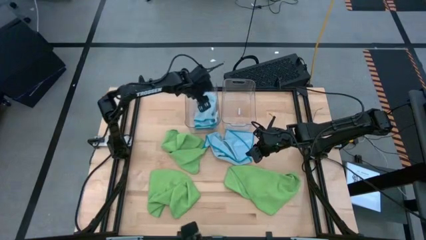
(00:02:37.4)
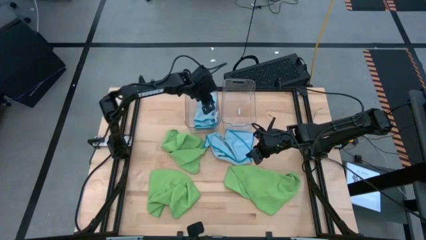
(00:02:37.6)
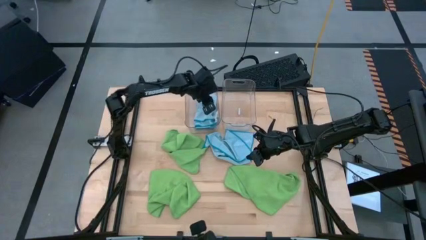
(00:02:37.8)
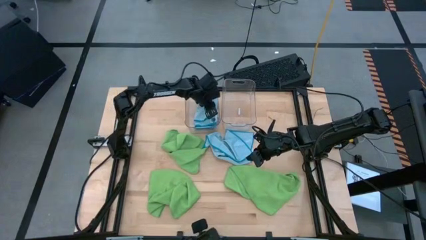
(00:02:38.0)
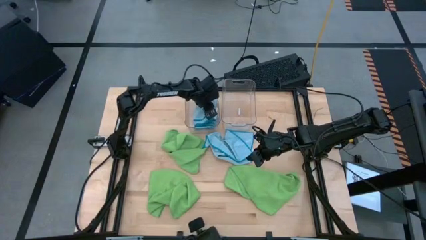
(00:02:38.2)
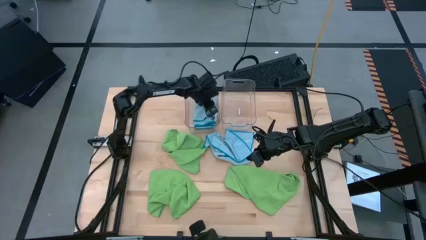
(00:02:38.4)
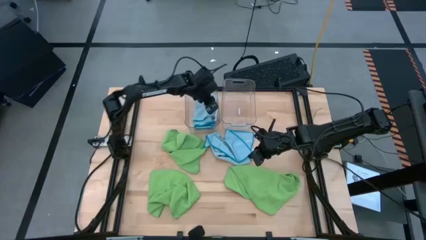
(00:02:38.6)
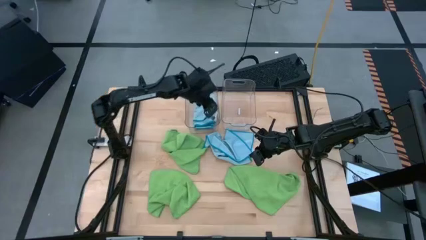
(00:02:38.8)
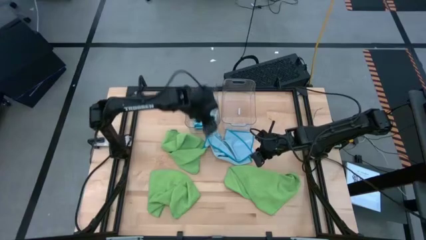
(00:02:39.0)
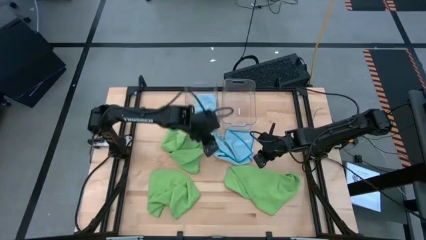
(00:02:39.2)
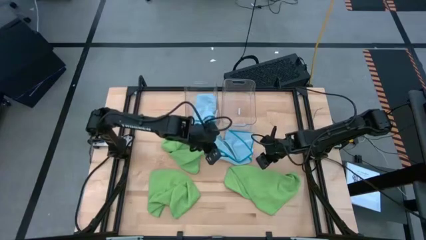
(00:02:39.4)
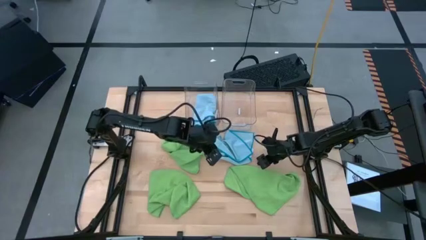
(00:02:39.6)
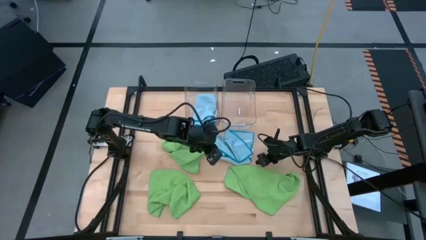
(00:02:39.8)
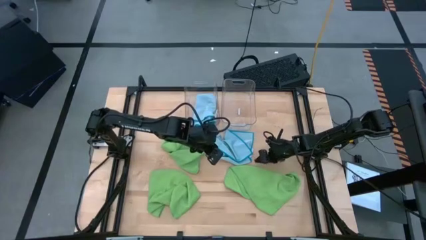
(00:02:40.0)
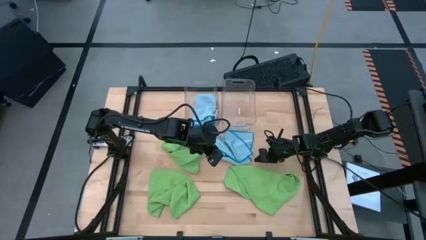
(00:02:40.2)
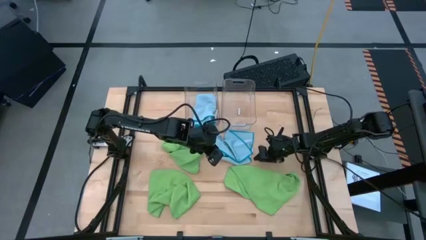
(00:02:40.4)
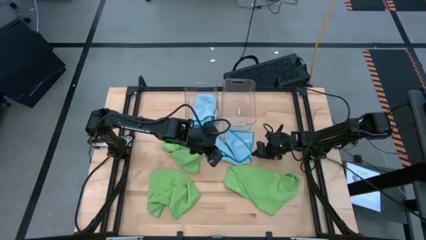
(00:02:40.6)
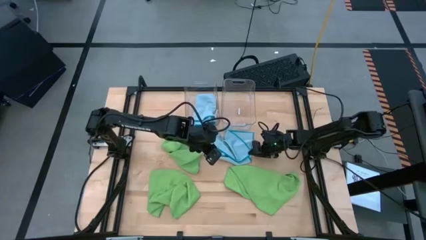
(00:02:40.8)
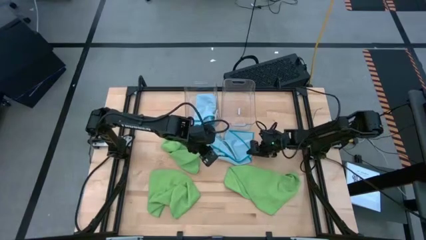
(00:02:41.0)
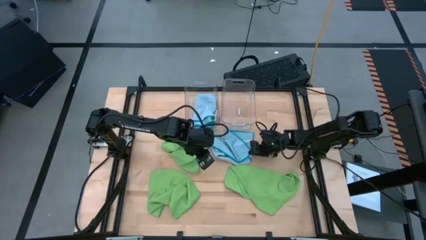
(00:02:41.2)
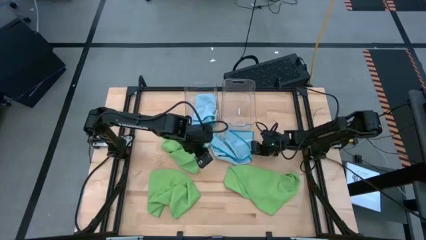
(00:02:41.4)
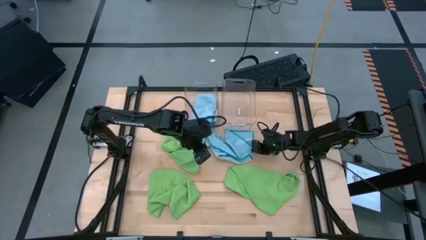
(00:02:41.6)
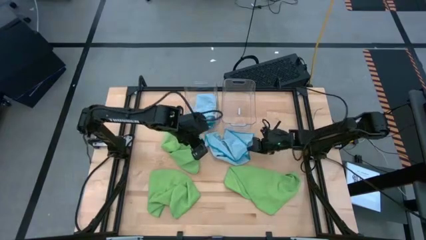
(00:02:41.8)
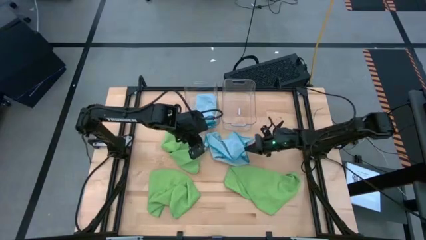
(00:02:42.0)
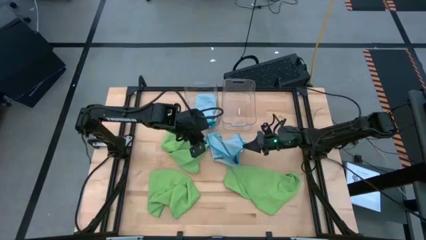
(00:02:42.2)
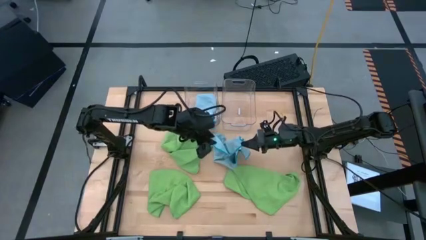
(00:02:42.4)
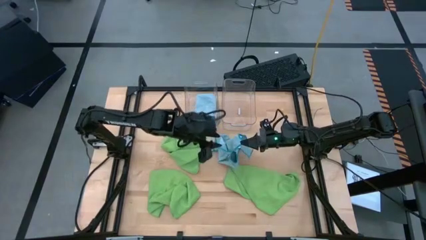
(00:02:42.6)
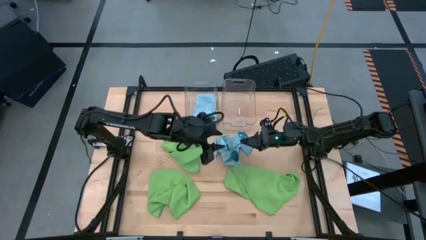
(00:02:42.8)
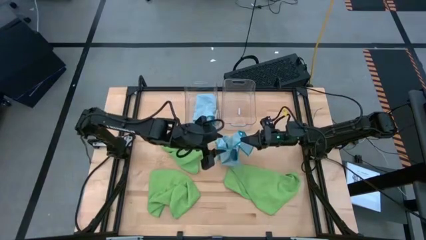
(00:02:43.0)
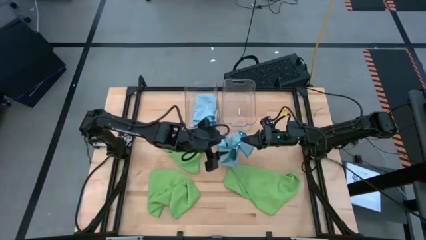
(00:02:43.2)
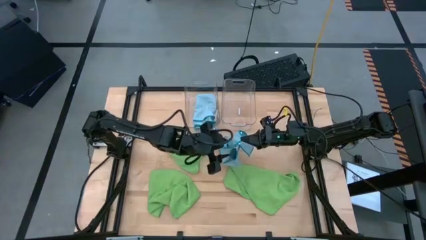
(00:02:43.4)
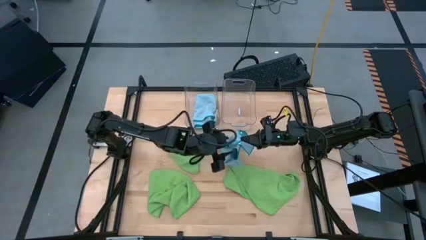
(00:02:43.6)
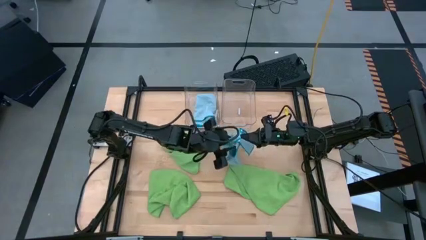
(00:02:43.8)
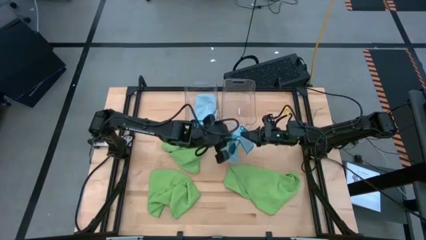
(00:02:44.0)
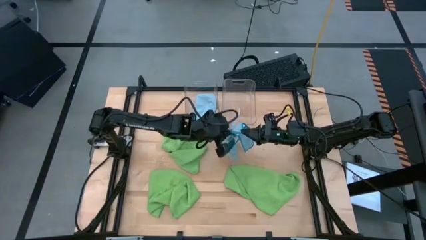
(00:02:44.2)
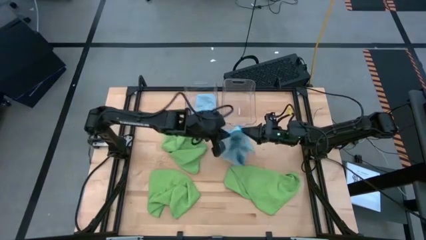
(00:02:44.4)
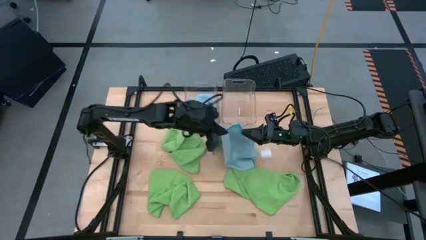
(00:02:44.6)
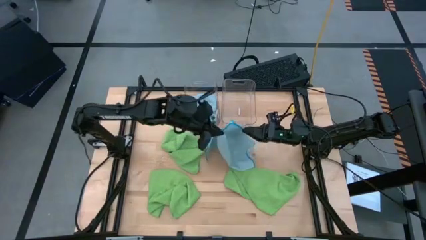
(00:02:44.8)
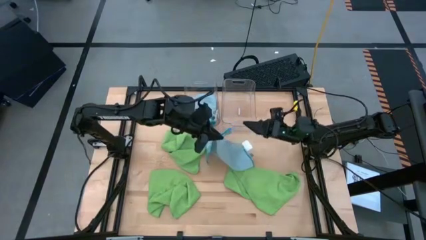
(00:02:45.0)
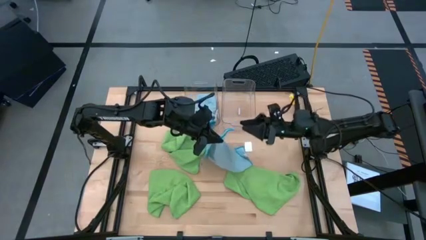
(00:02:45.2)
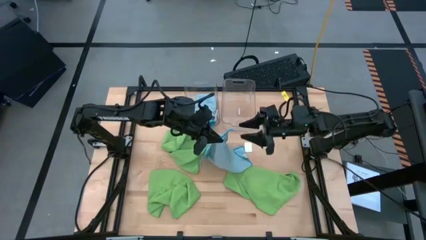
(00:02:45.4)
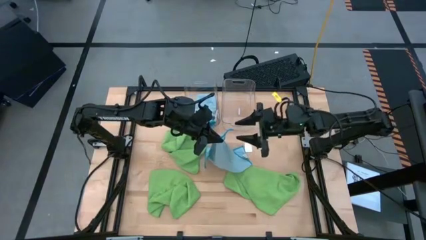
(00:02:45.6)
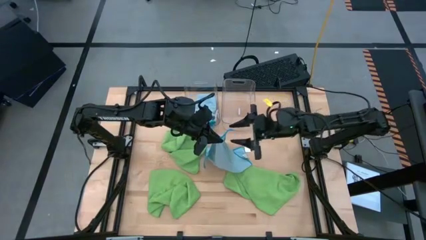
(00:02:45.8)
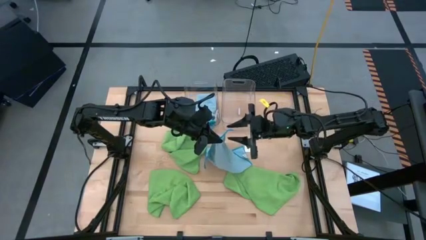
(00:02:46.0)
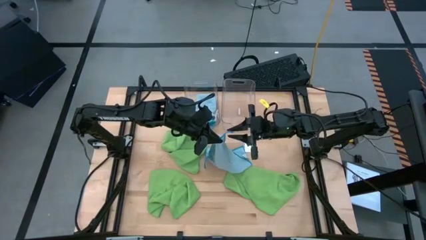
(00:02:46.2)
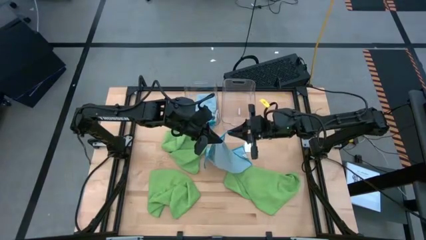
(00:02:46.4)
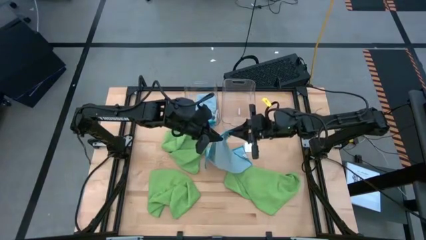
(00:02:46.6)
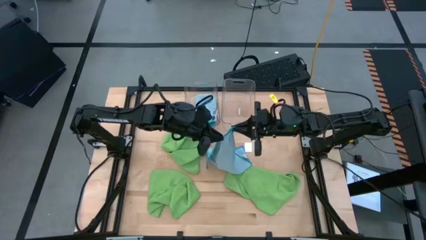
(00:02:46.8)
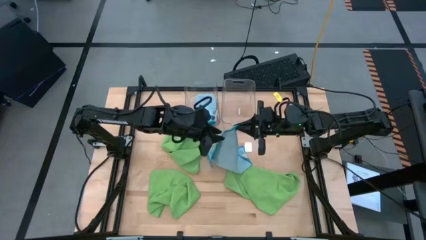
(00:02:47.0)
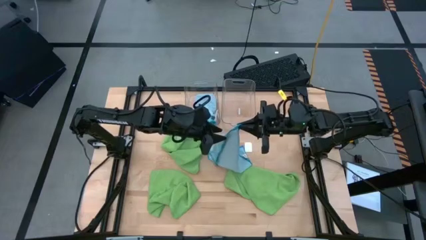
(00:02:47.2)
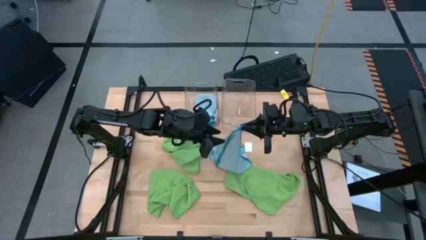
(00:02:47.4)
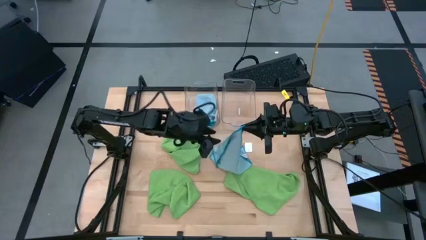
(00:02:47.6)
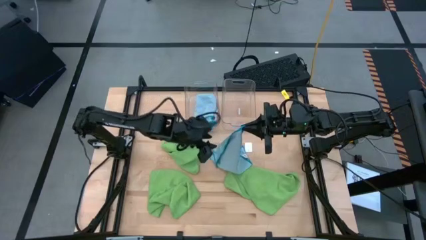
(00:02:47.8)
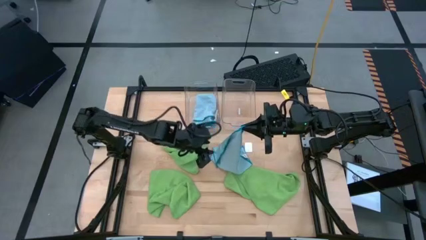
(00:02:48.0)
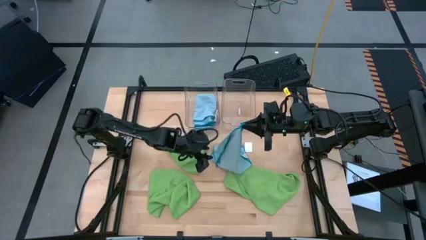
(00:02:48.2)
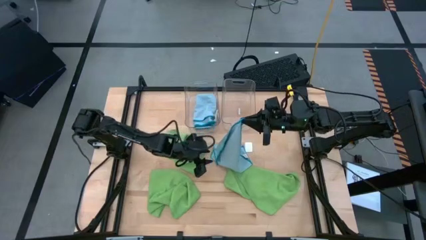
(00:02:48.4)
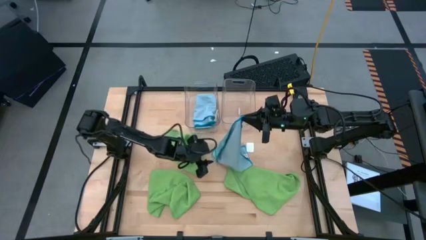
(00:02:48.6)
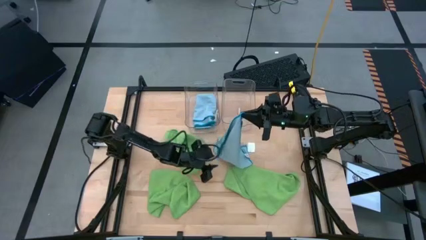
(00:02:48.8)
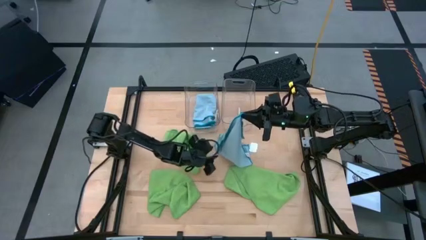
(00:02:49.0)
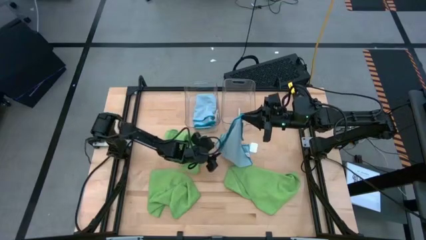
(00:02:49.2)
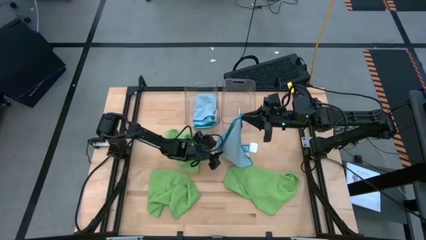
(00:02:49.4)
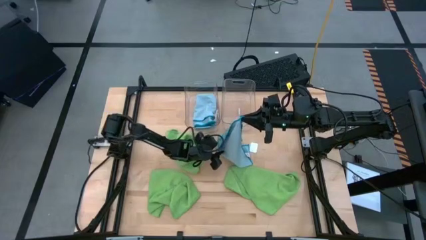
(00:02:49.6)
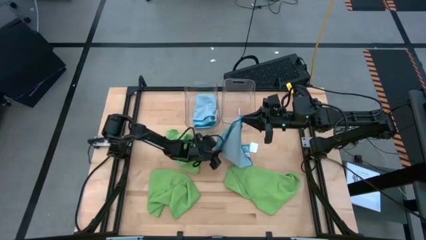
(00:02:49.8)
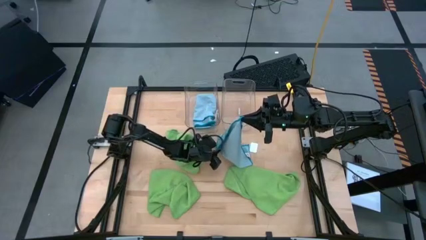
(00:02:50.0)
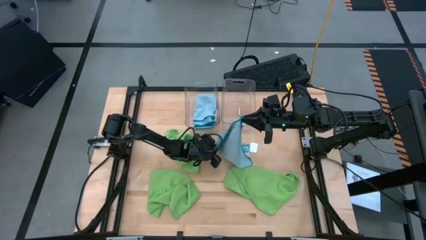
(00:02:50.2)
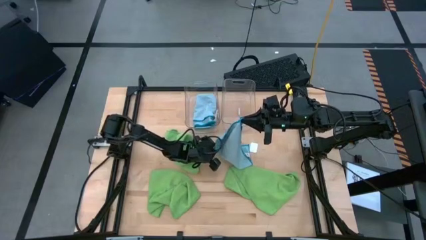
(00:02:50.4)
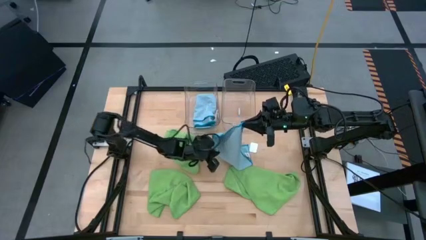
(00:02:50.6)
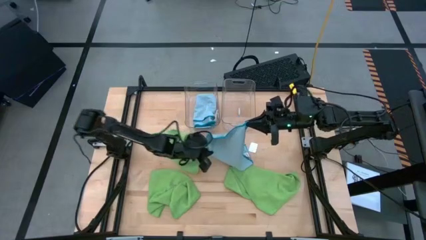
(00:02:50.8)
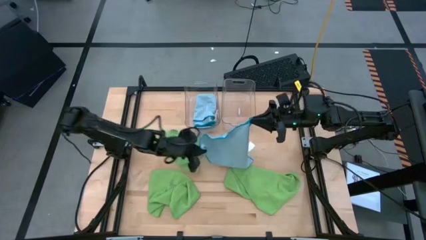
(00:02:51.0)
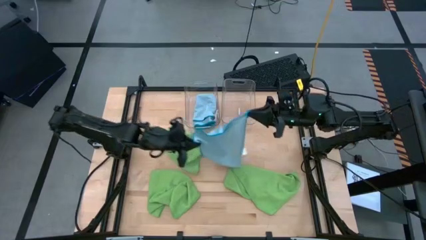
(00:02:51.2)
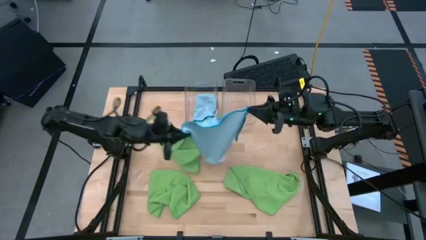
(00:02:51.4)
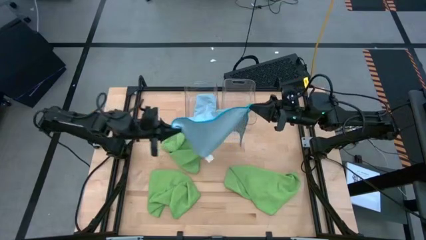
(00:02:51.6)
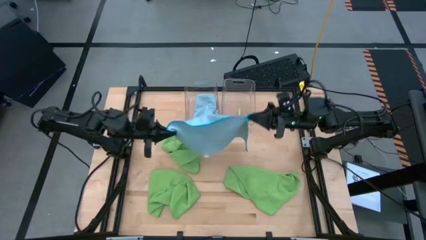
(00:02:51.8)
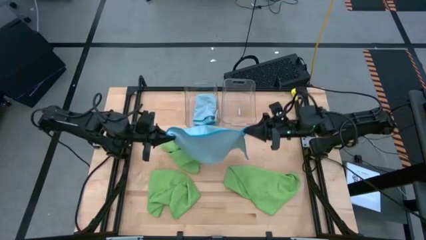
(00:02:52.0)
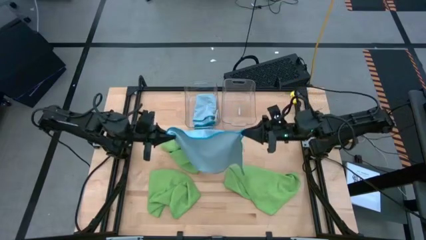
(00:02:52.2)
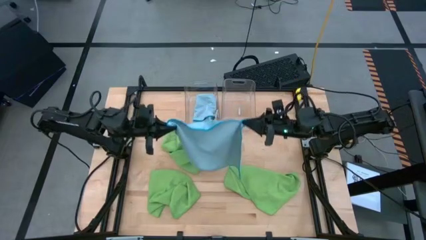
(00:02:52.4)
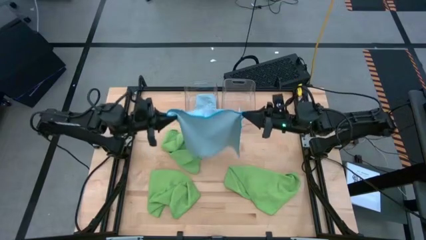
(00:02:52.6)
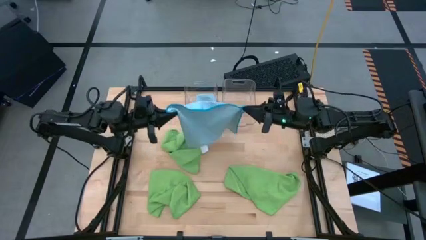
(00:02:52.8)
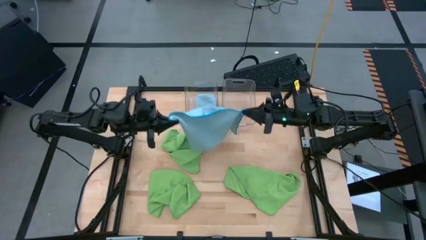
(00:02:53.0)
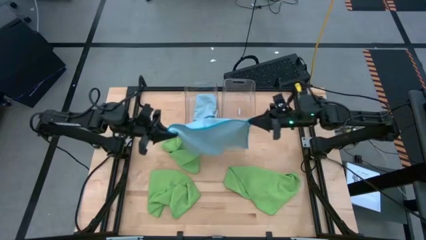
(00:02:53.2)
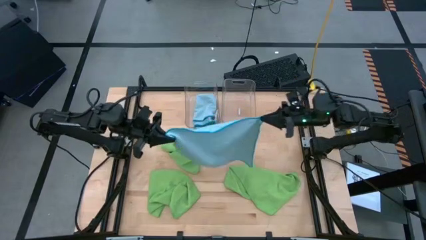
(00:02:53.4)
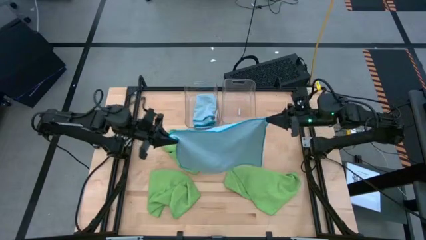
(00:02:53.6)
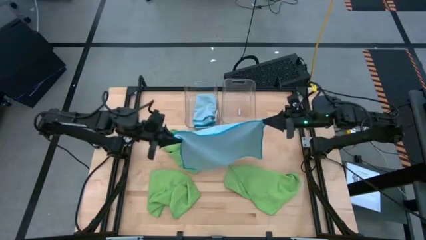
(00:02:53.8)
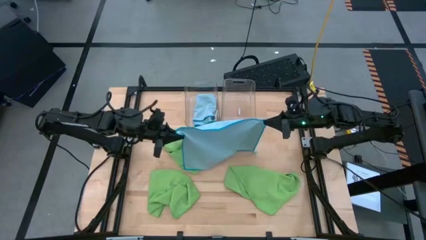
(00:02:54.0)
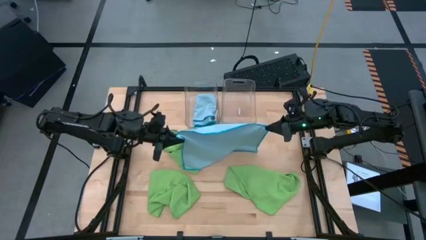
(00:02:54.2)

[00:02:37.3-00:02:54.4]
Task: Fold microfiber towels
Fold the blue microfiber towel
